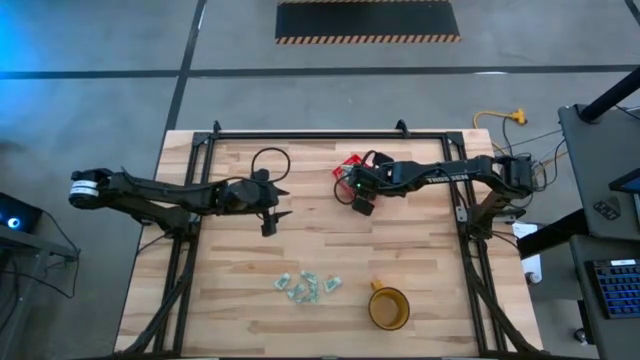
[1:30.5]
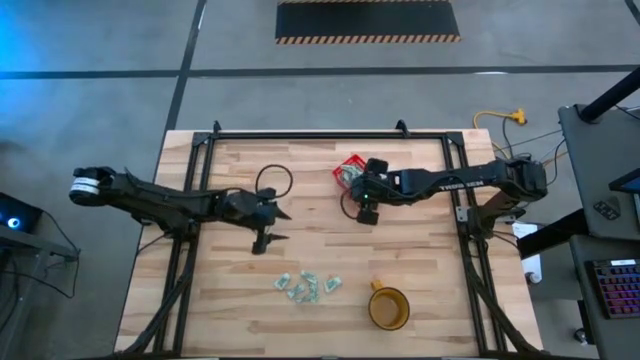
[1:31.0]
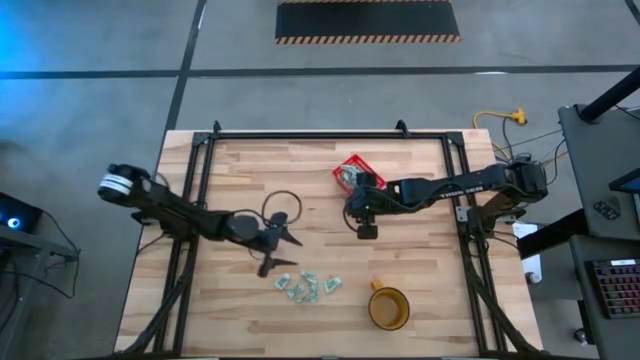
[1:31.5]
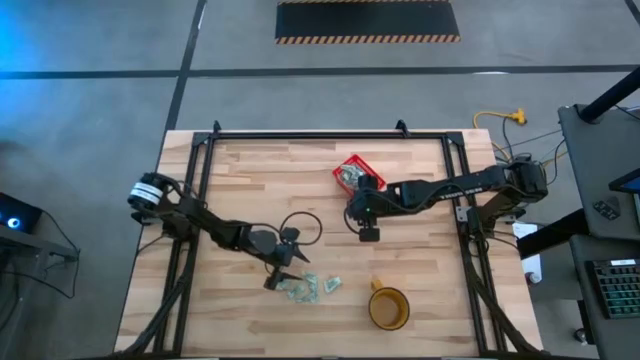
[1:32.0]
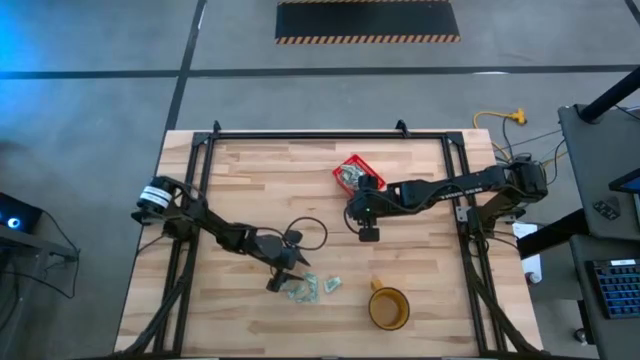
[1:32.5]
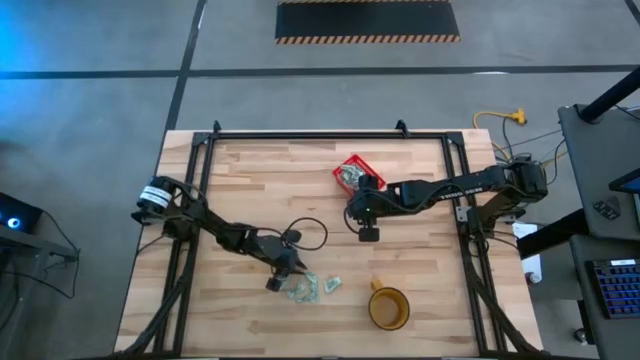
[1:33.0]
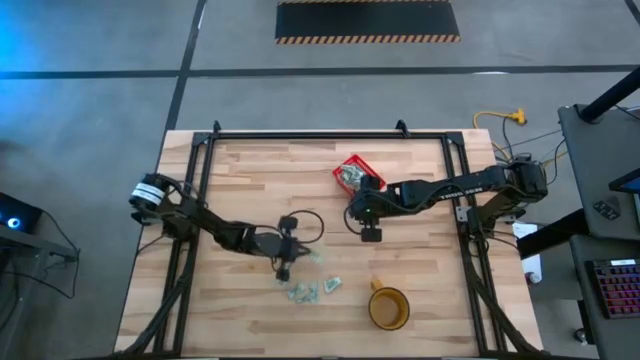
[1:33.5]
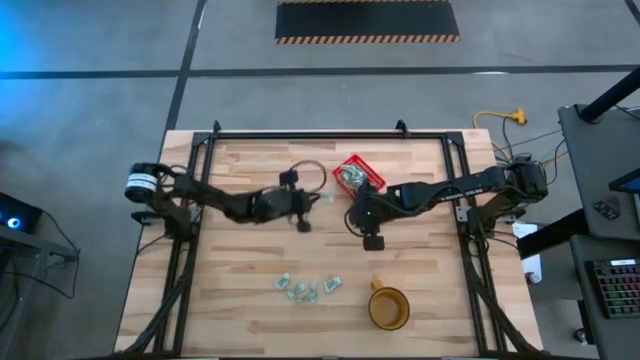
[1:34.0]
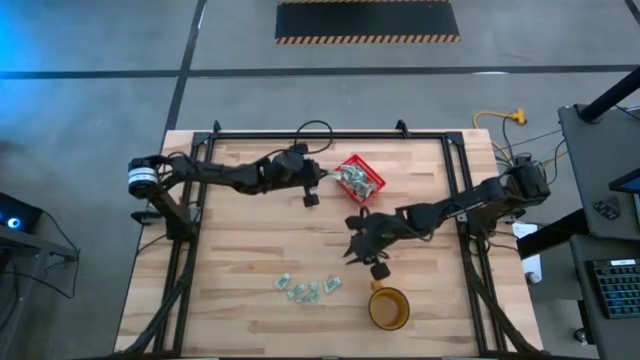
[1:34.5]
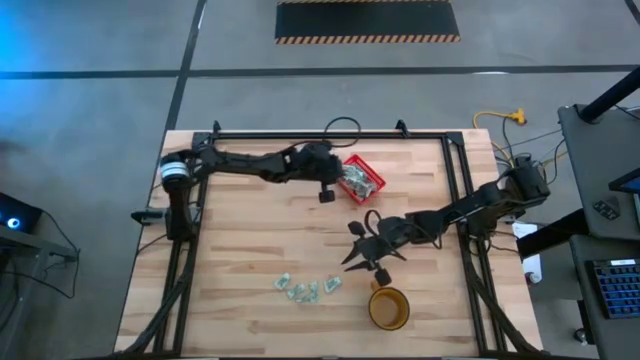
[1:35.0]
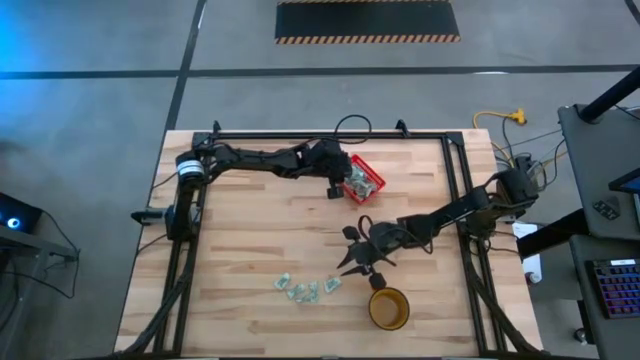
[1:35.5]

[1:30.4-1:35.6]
Task: Pick and place Stevia / Truvia into bins
Put the stevia packet into the red basket

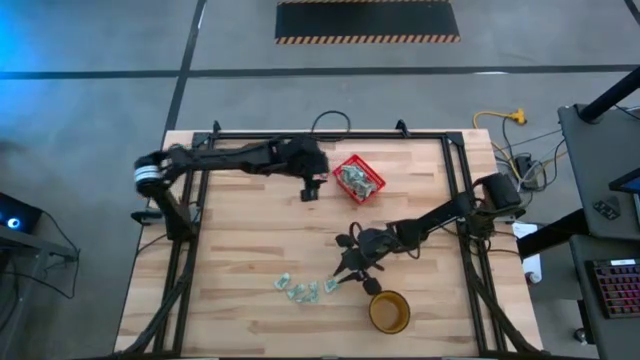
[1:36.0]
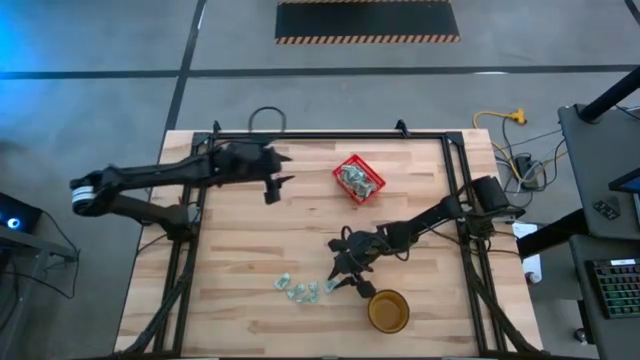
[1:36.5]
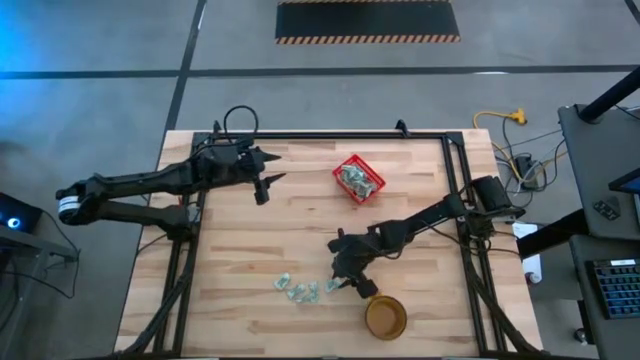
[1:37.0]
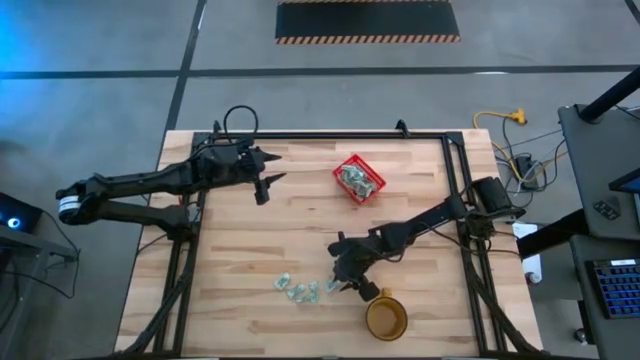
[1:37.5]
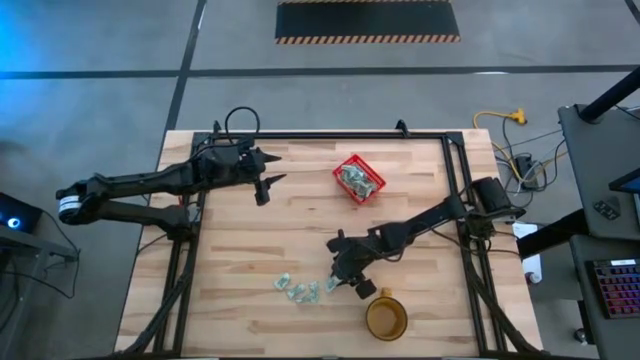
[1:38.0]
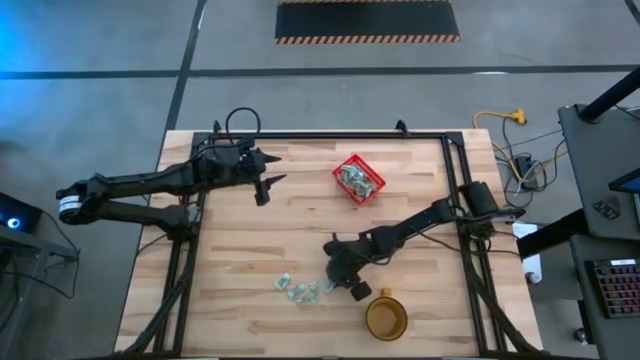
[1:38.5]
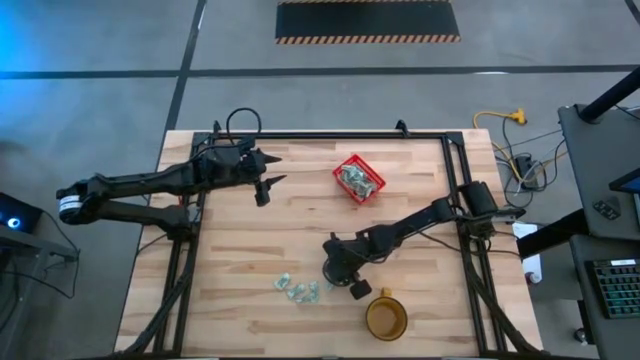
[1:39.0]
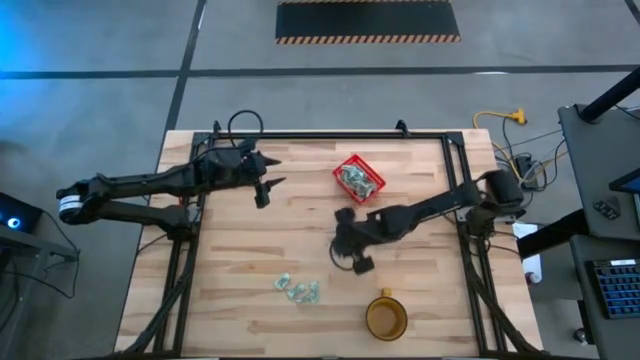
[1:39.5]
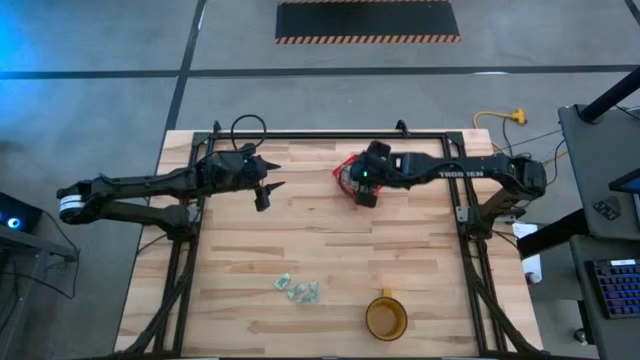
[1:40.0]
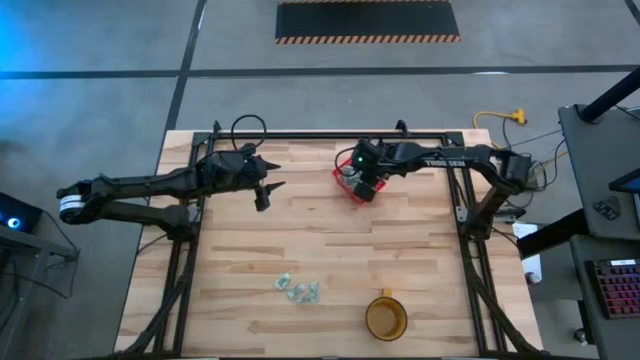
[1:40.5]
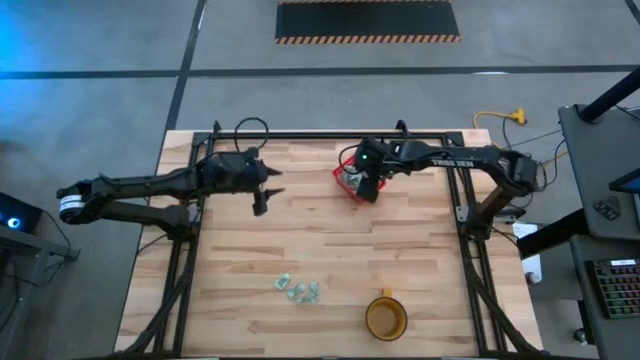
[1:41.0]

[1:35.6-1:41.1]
Put the stevia packet into the red basket

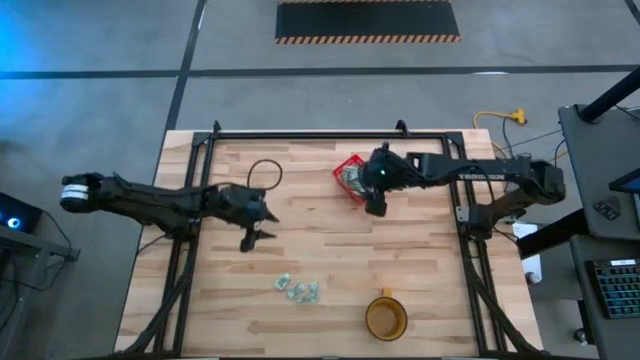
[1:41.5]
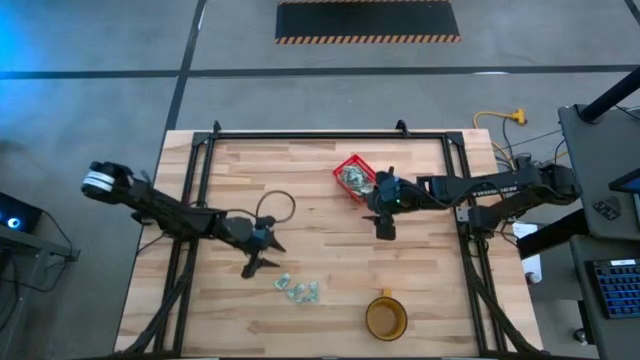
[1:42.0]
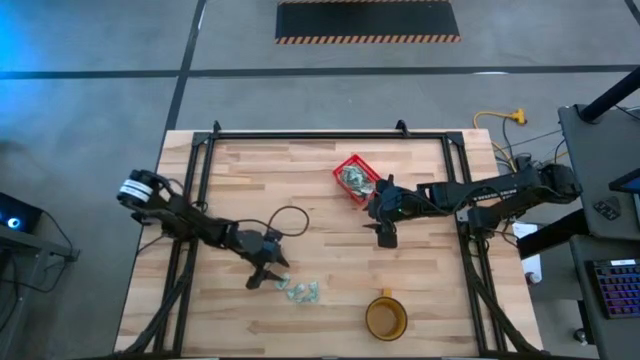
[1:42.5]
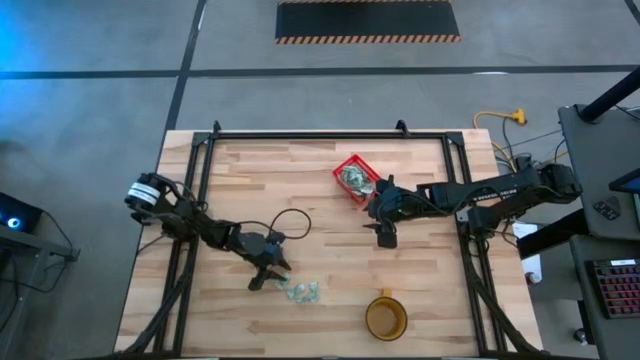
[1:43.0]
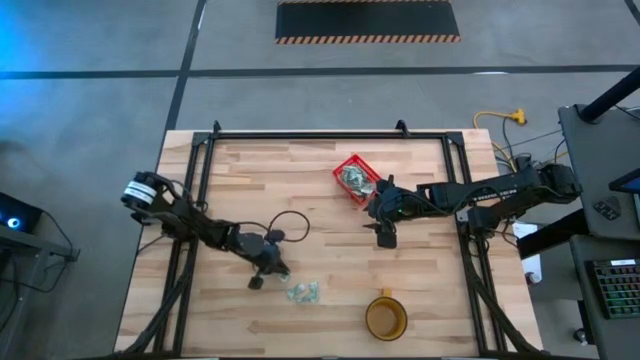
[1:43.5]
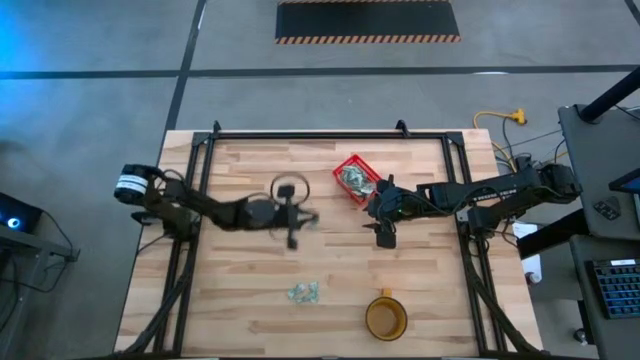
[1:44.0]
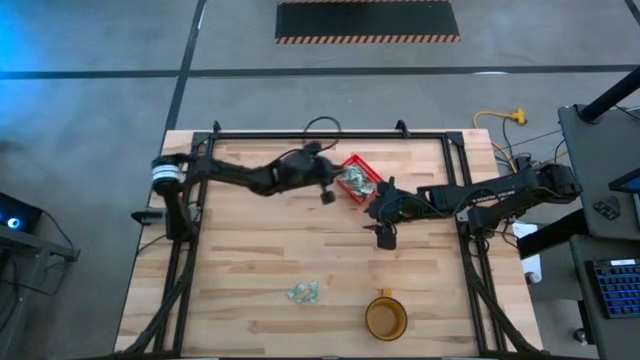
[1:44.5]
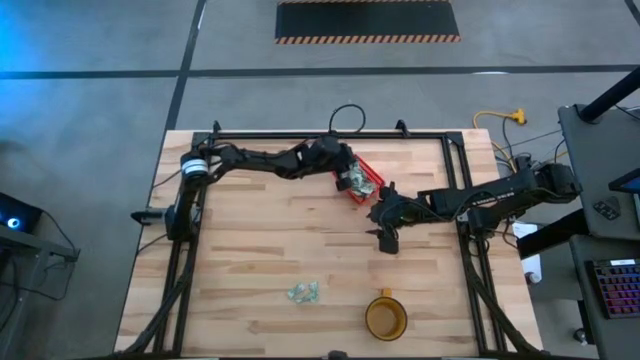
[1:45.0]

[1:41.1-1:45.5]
Put the stevia packet into the red basket

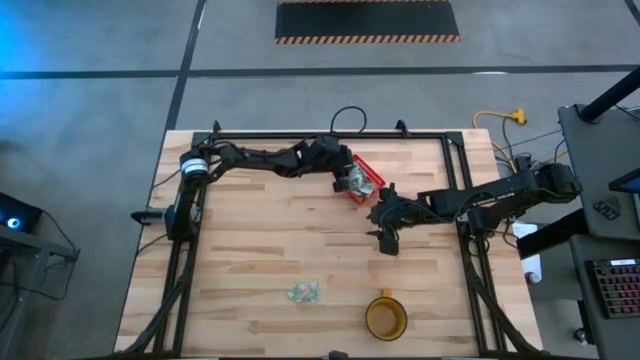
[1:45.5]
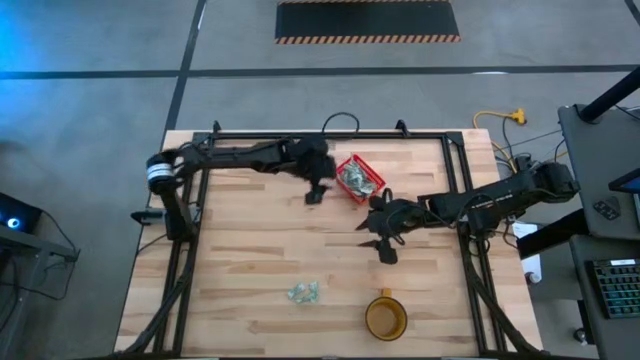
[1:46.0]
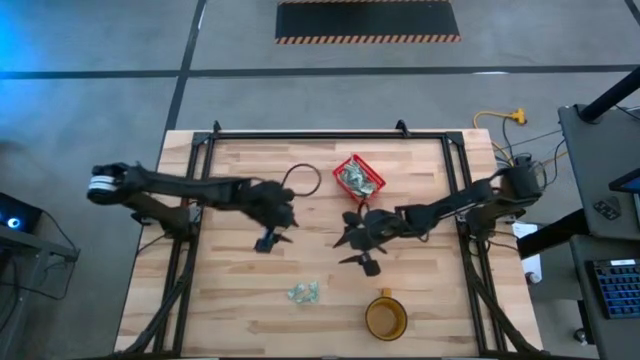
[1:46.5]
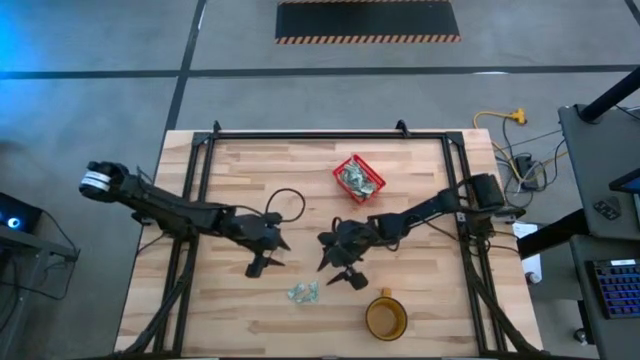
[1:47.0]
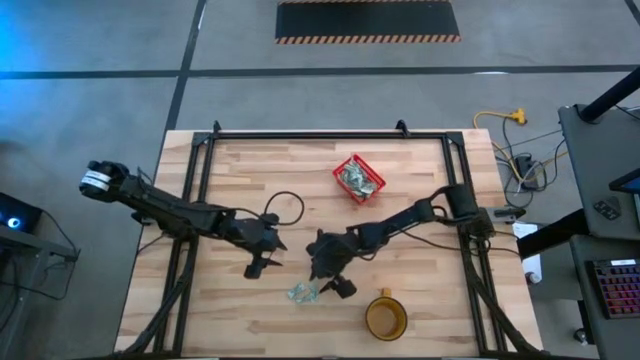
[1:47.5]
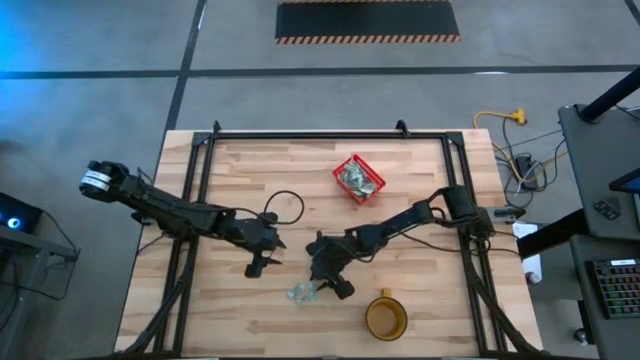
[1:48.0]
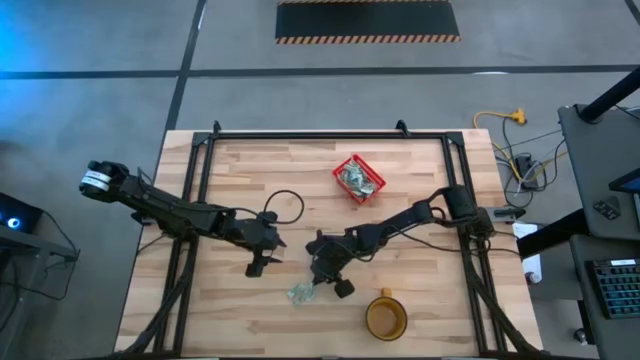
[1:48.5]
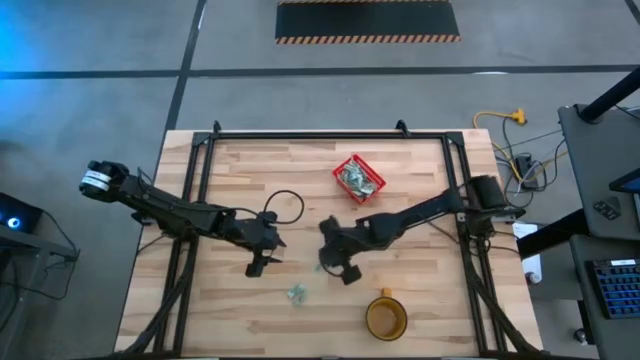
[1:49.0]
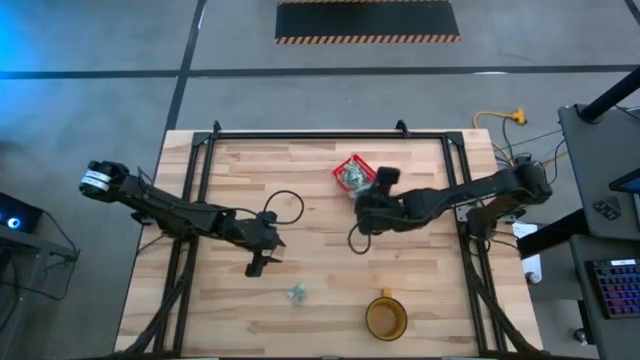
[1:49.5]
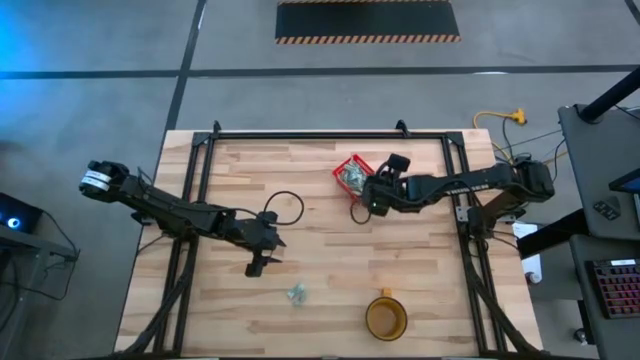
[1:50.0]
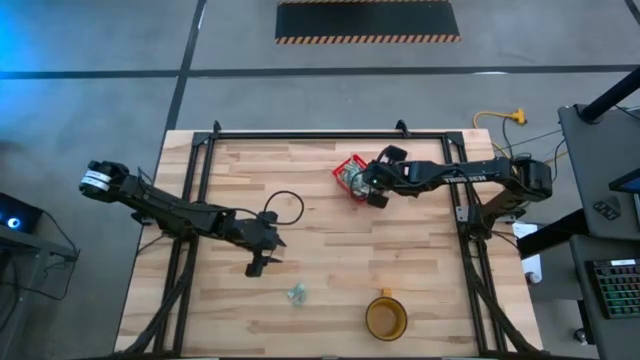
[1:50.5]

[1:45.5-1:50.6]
Put the stevia packet into the red basket

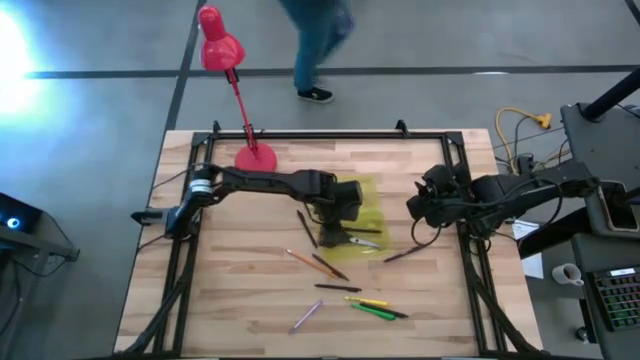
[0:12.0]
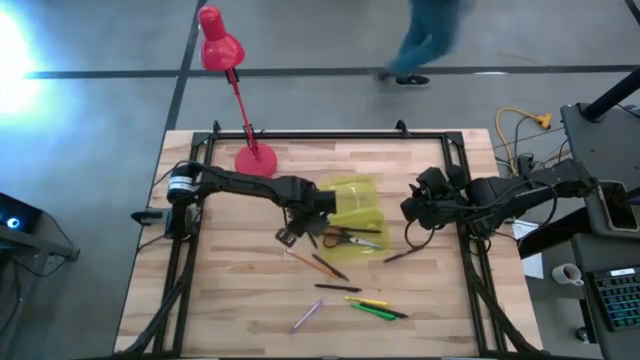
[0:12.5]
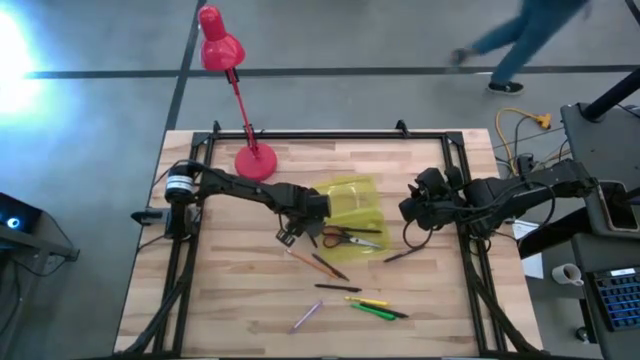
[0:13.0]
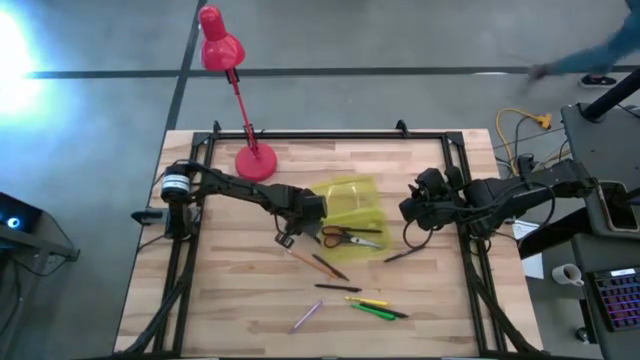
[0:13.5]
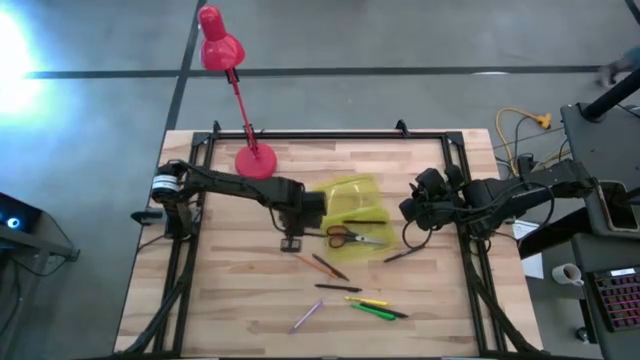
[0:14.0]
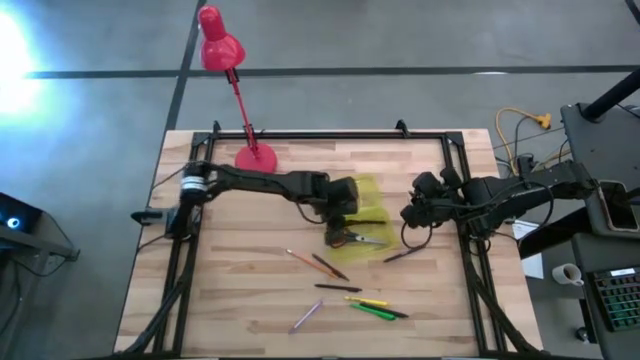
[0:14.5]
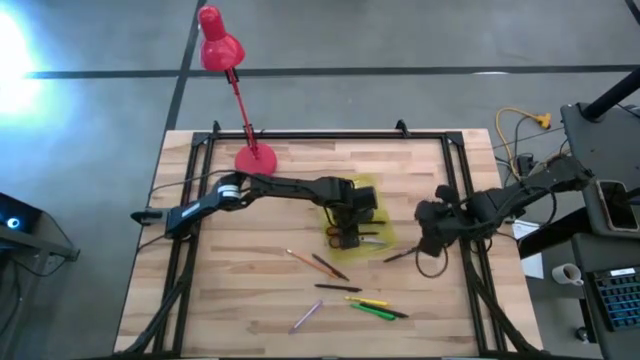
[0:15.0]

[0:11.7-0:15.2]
Task: Pick & place school supplies into a supply box
Put the black pen into the yellow supply box
